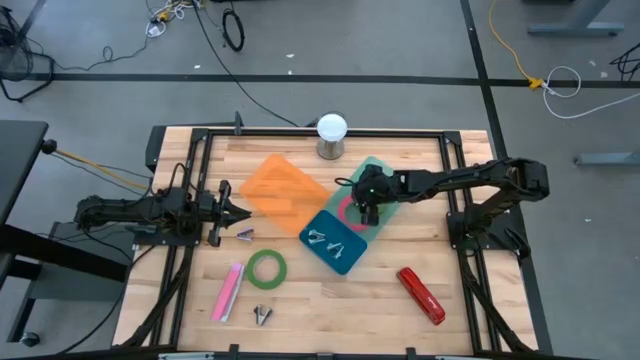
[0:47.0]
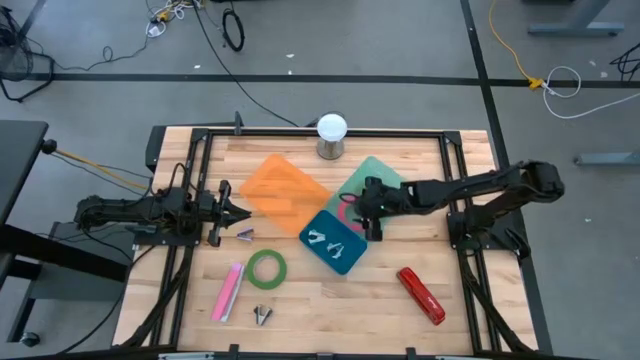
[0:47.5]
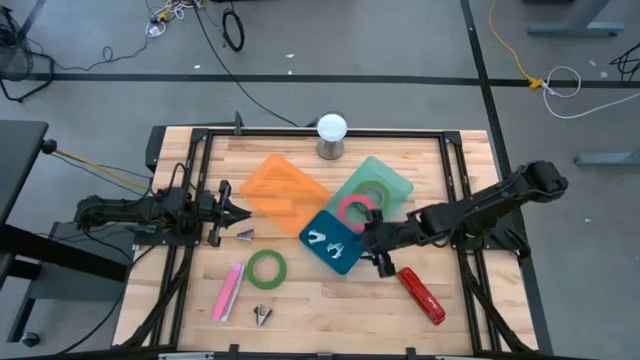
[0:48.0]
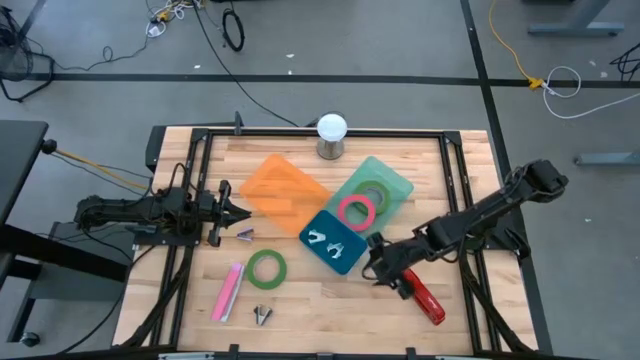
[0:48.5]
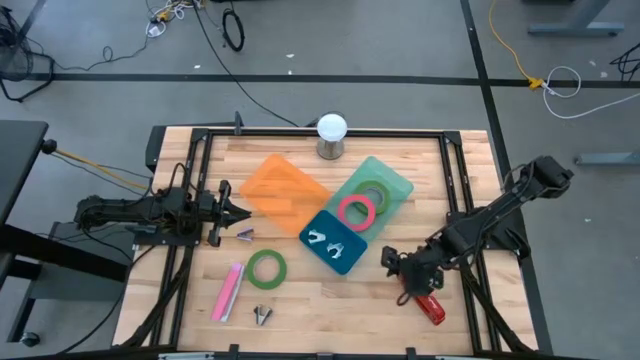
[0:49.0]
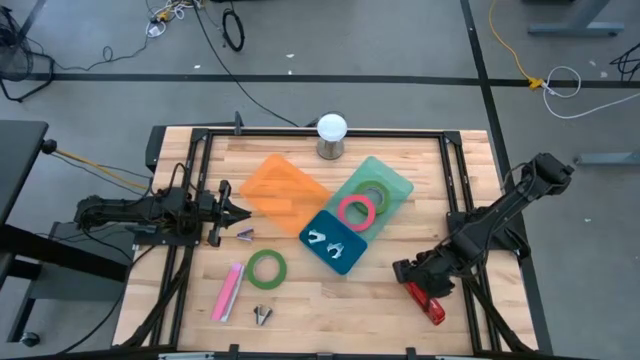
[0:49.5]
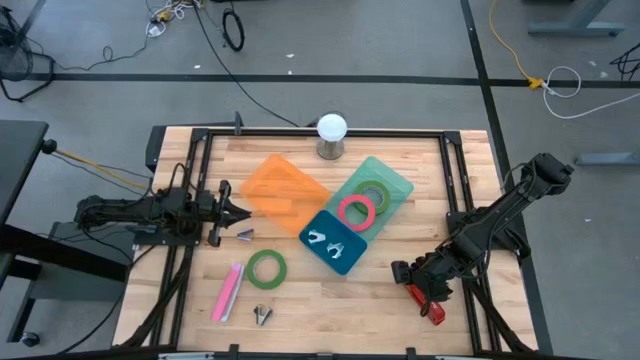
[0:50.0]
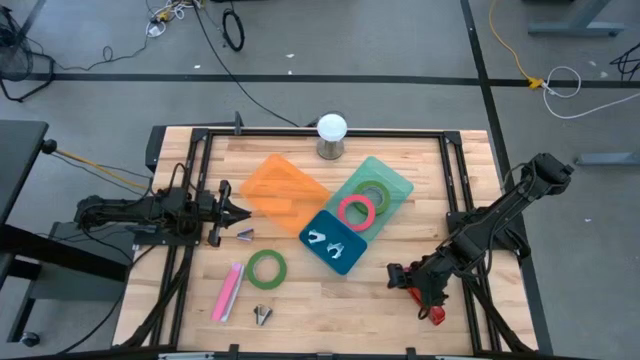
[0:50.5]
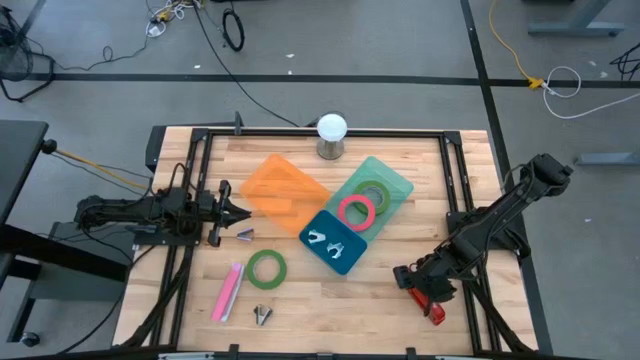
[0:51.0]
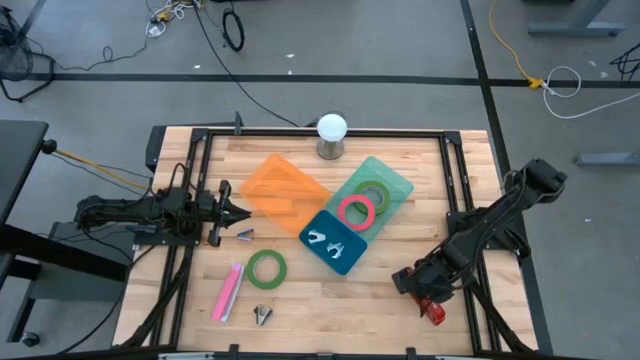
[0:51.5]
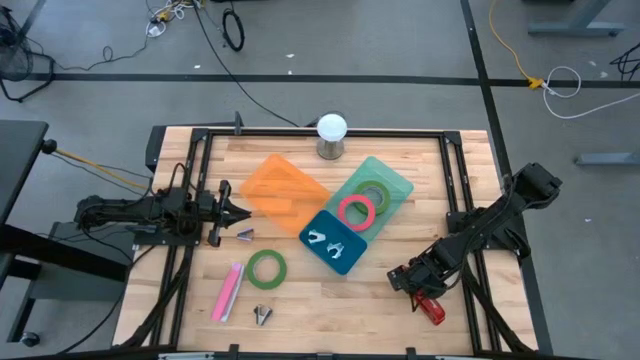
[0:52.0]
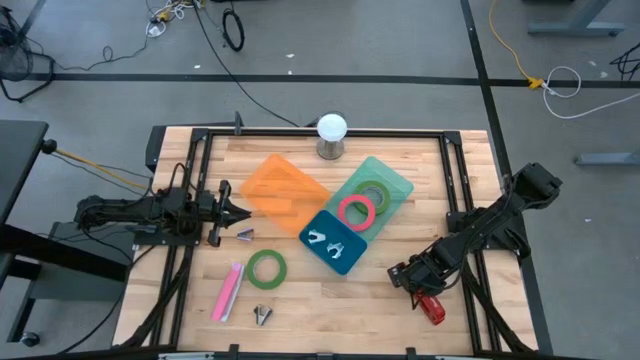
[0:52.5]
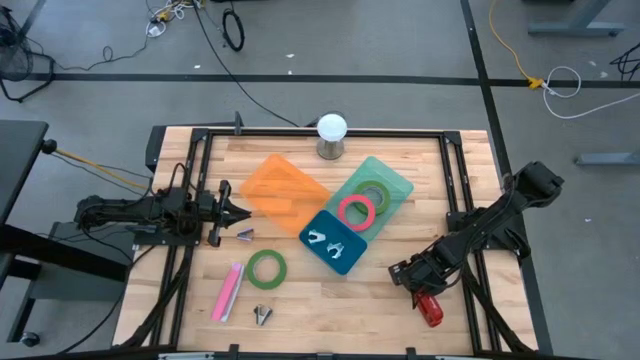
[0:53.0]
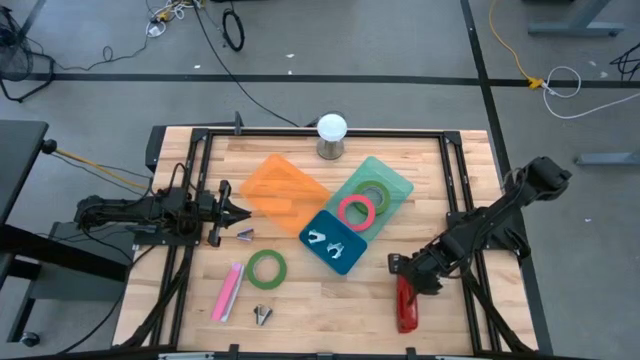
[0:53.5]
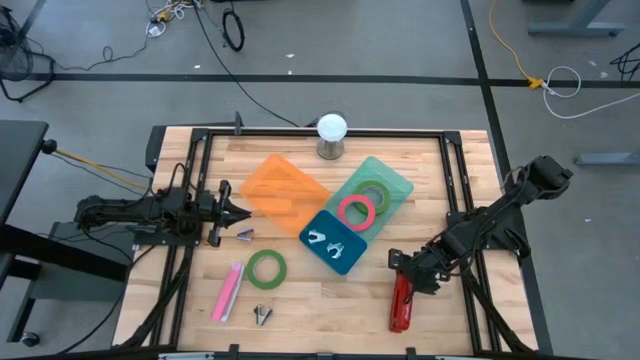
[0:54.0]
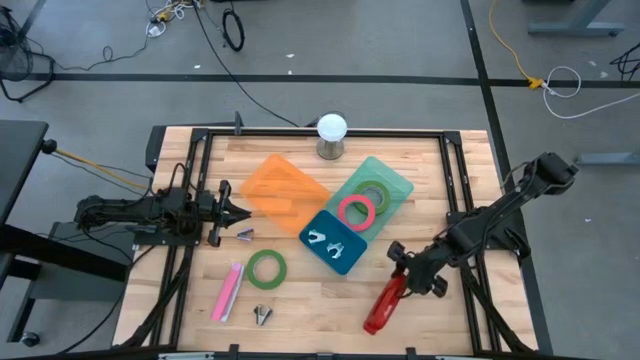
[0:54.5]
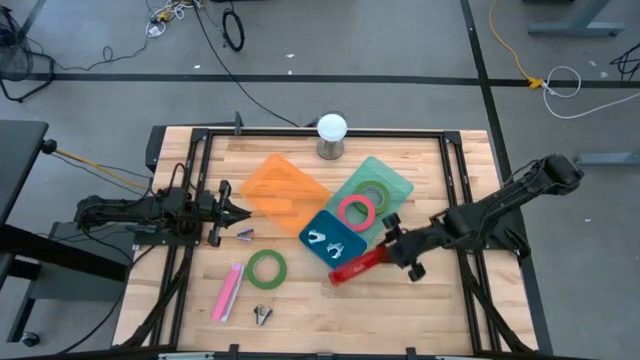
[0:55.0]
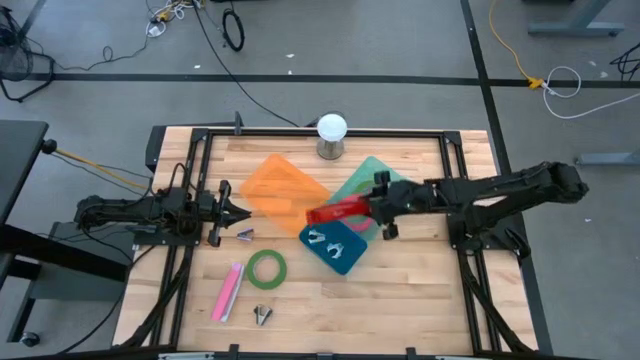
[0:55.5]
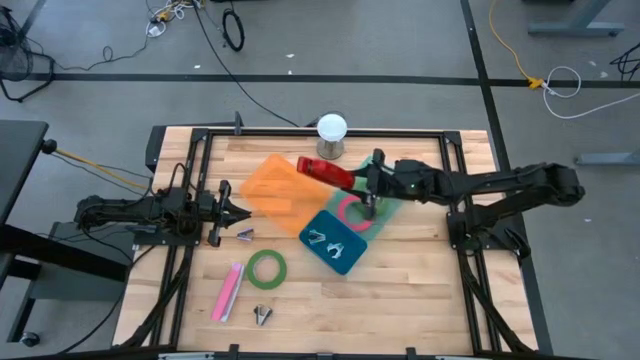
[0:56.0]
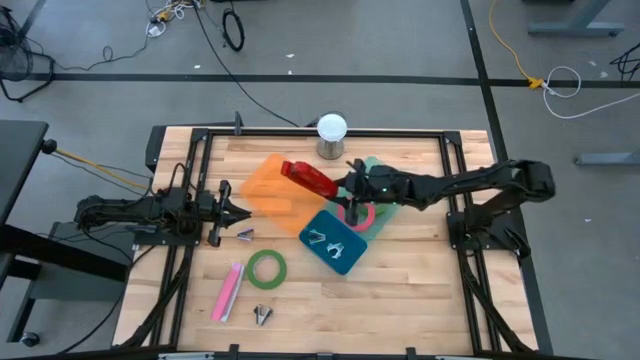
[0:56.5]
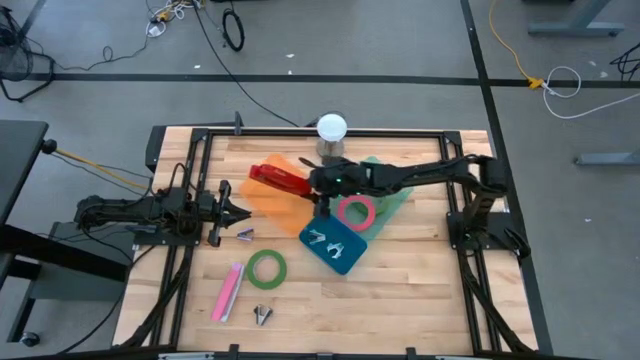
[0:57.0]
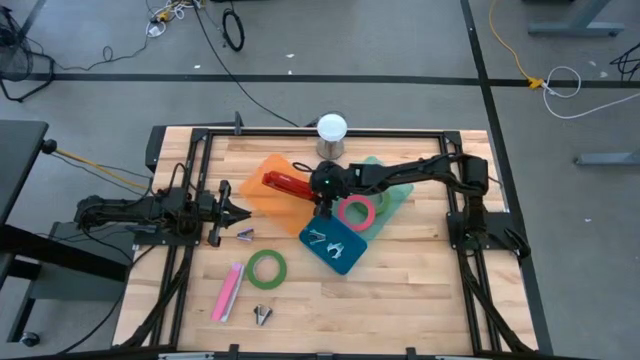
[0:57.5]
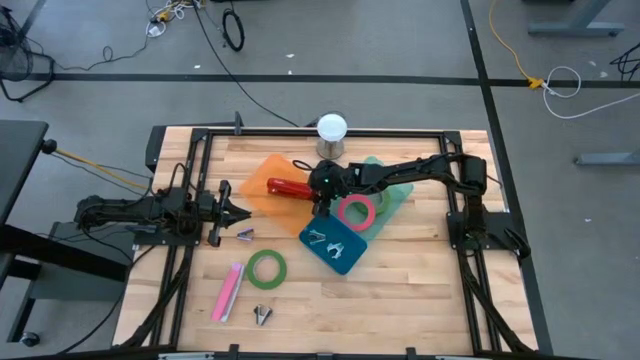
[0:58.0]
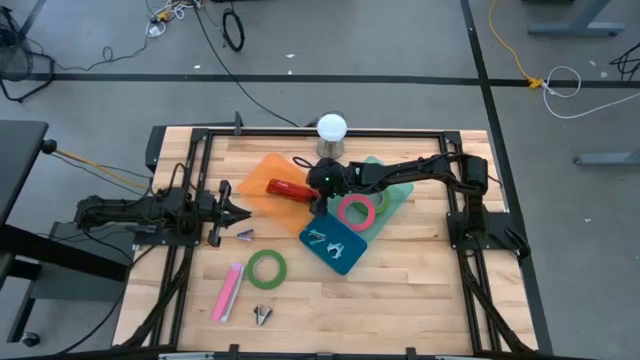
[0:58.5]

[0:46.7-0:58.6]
Task: Pick and place Stapler, Stapler remover, tape
Put the red stapler into the orange bin

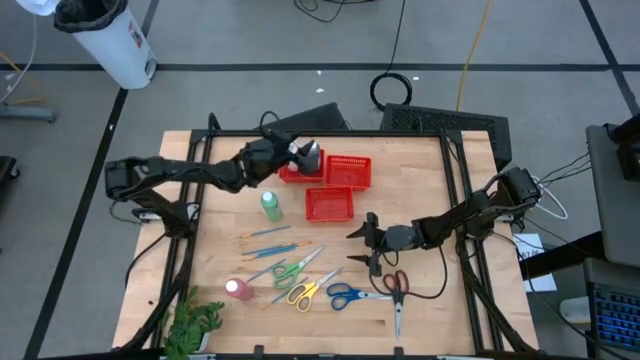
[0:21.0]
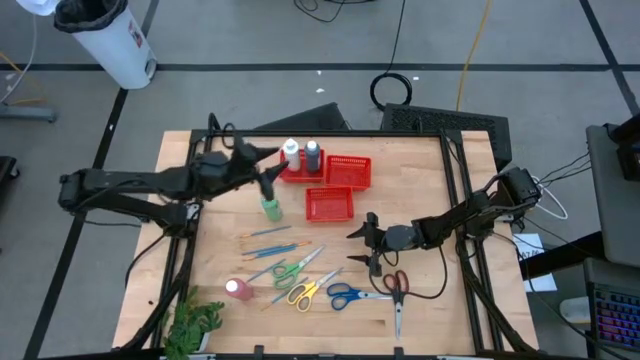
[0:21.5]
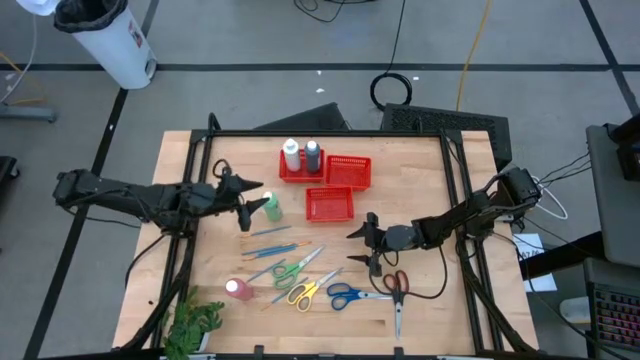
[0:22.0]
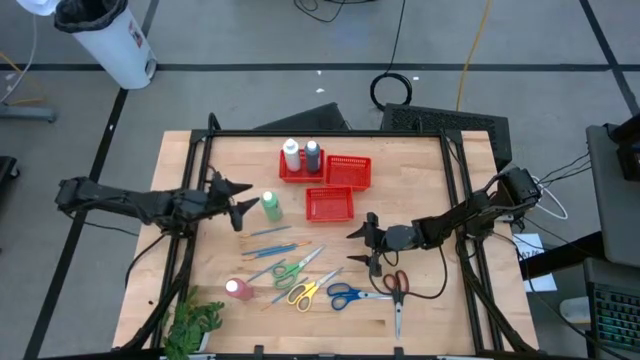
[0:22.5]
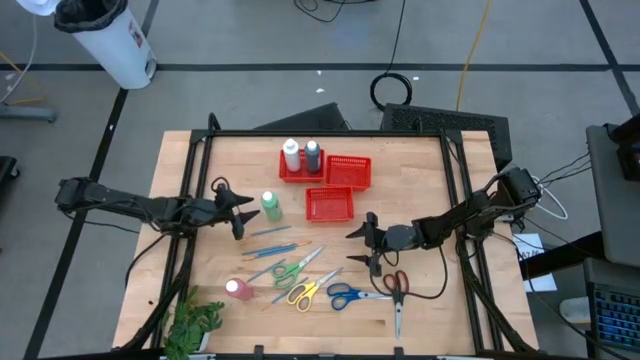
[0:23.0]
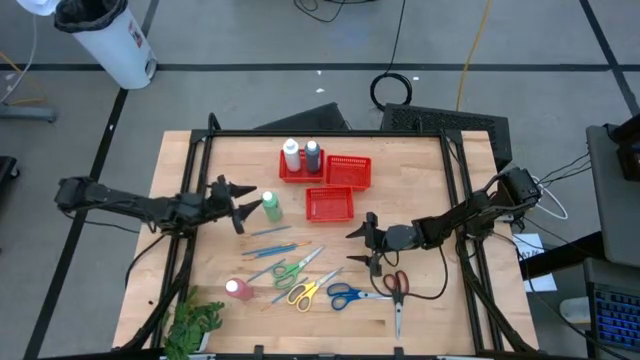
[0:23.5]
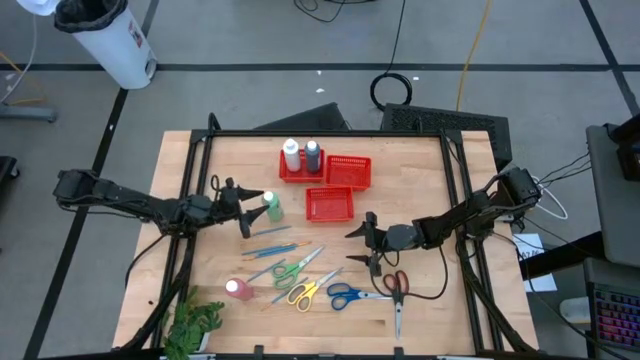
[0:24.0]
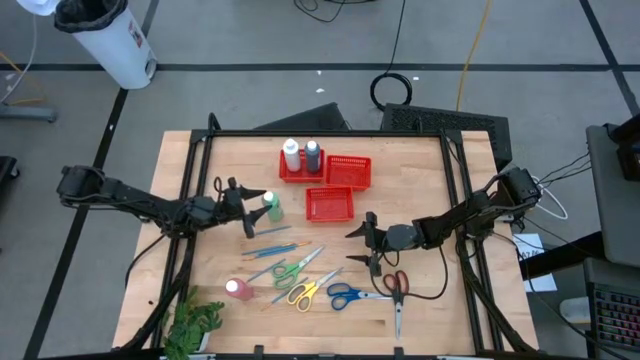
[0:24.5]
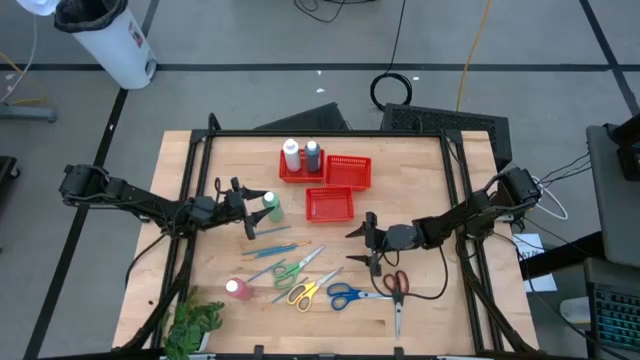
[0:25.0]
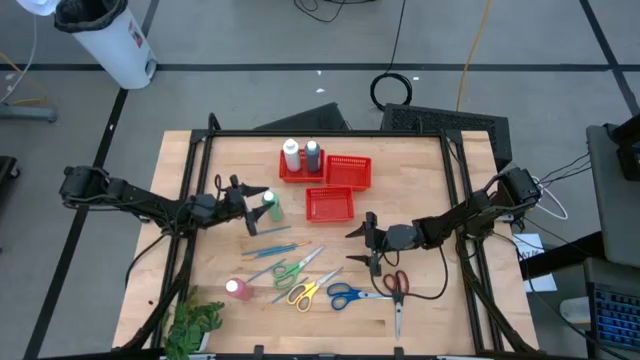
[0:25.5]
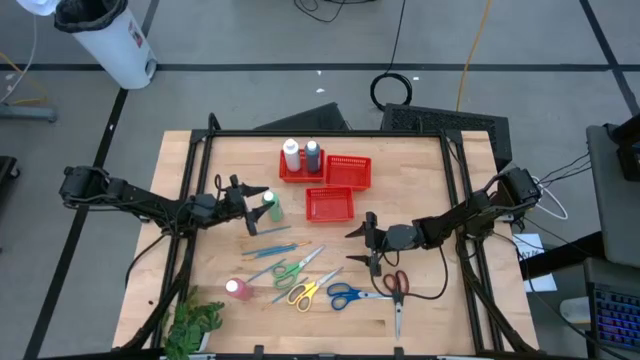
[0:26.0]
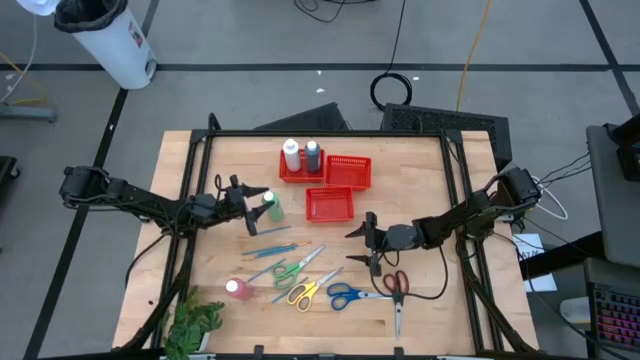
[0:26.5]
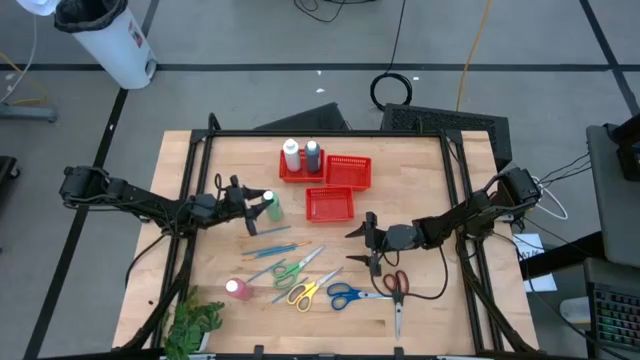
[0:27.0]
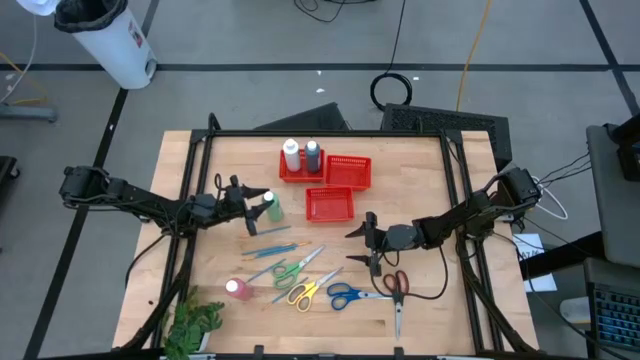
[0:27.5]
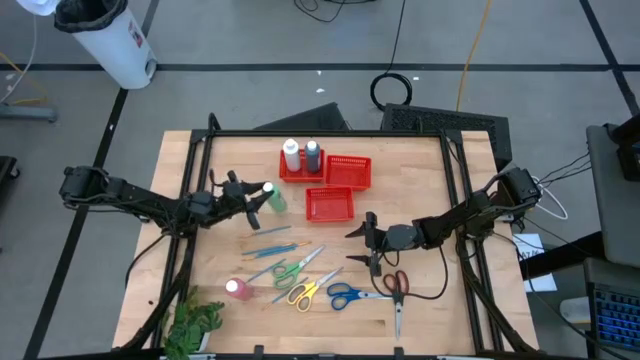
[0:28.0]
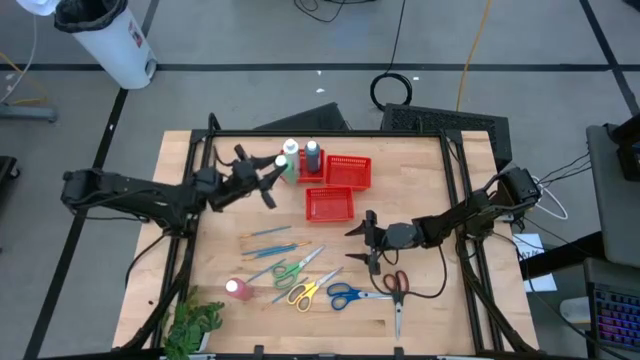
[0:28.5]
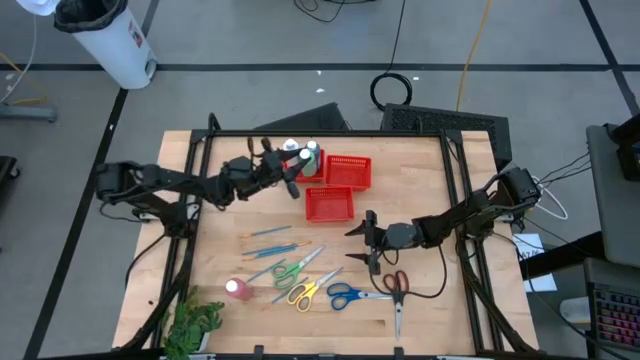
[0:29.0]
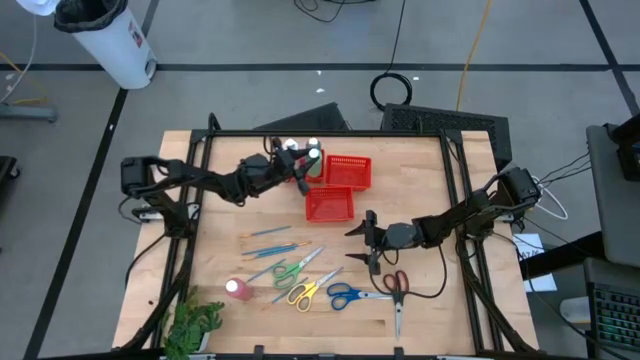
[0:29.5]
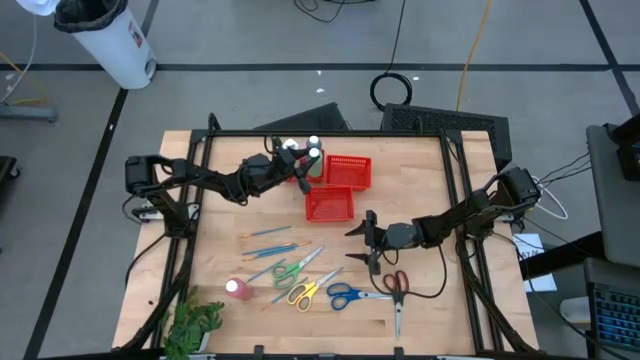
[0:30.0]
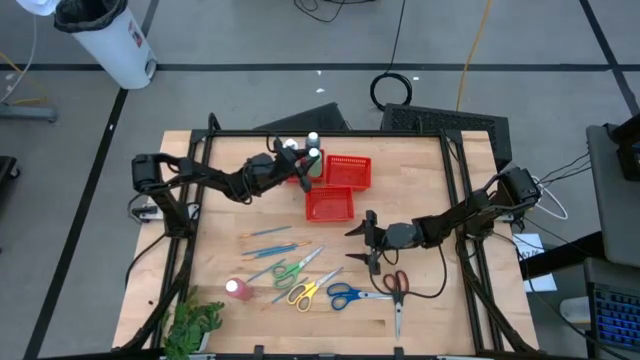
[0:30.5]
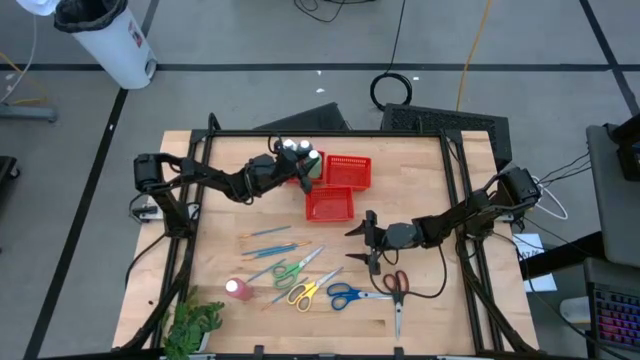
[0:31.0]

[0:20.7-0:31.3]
Task: Pick & Place Paint Supplies
Put the green paint bottle into the top left red bin
